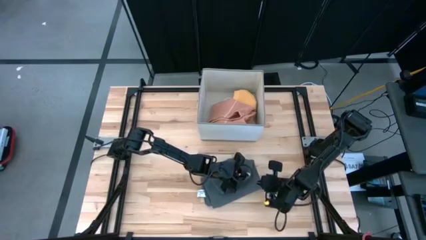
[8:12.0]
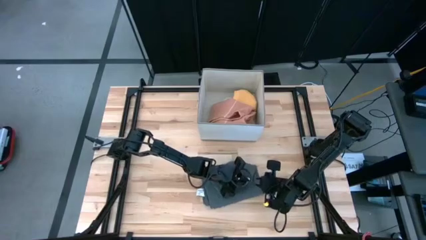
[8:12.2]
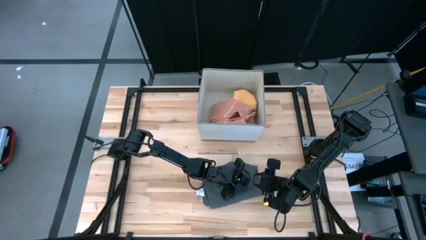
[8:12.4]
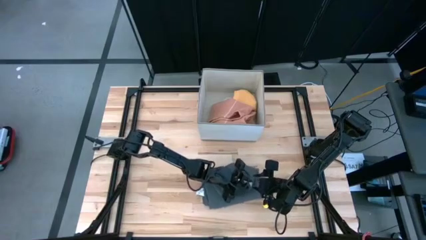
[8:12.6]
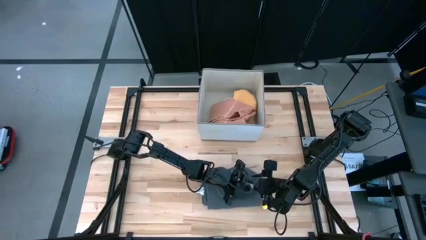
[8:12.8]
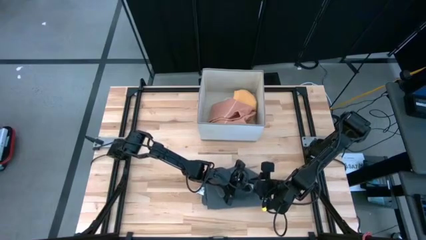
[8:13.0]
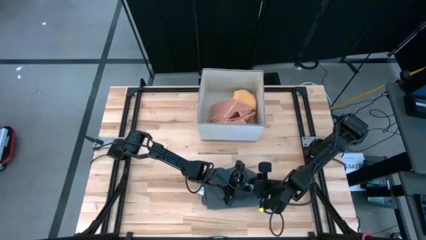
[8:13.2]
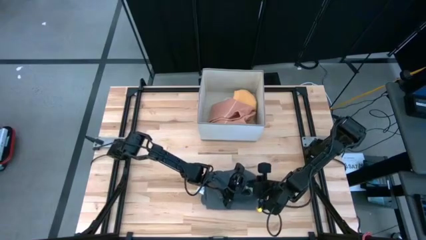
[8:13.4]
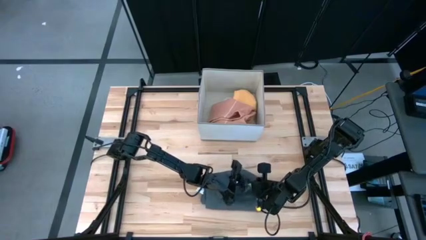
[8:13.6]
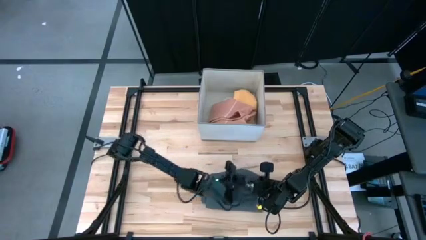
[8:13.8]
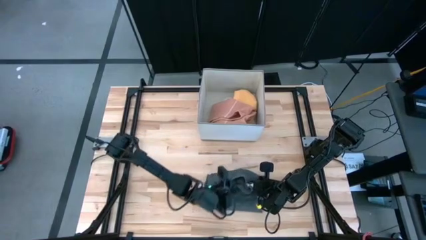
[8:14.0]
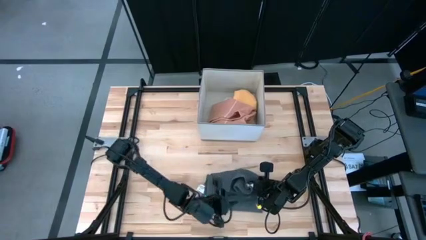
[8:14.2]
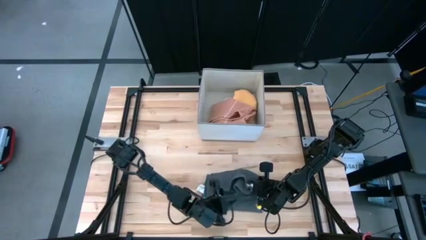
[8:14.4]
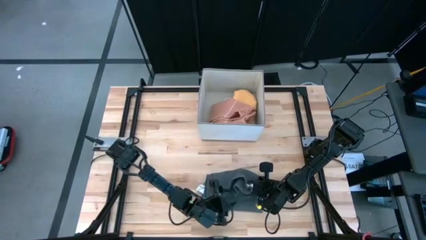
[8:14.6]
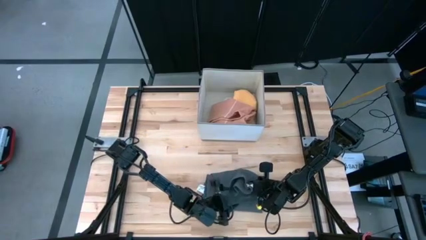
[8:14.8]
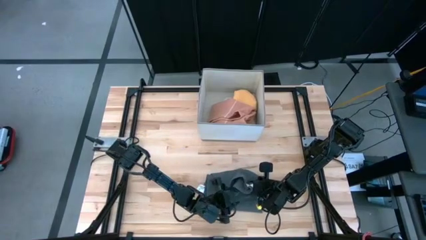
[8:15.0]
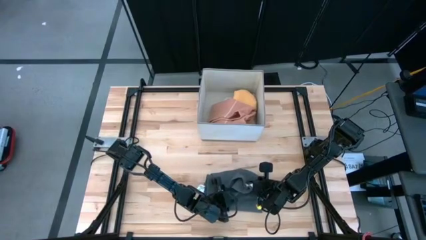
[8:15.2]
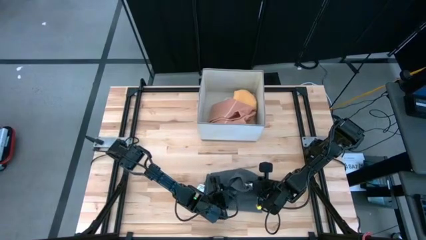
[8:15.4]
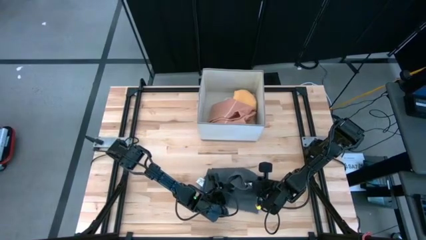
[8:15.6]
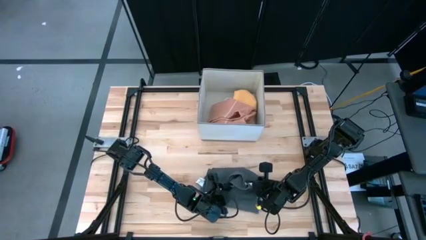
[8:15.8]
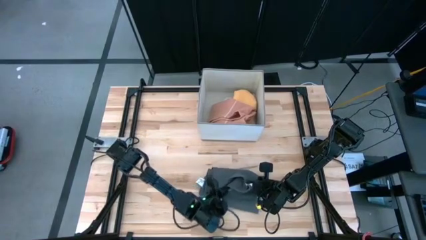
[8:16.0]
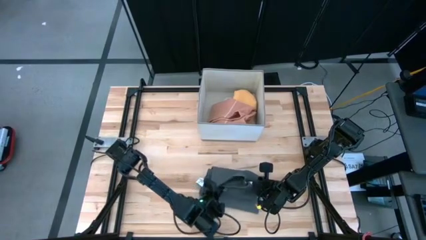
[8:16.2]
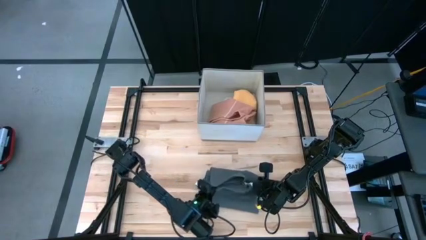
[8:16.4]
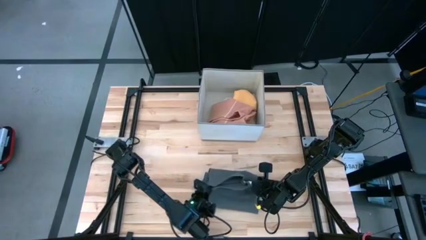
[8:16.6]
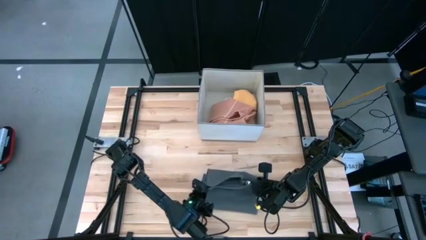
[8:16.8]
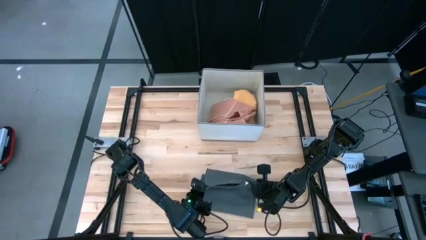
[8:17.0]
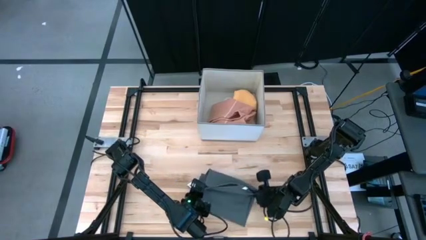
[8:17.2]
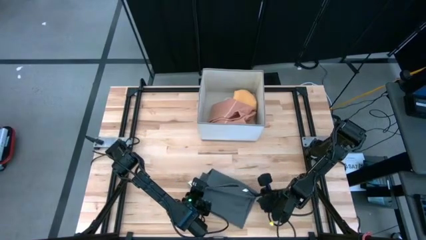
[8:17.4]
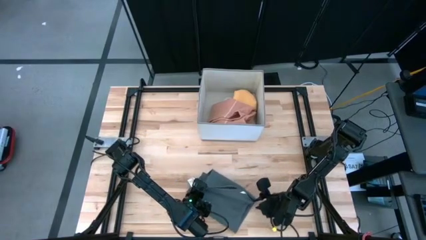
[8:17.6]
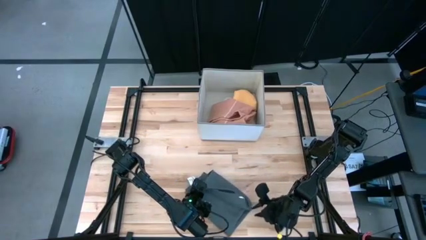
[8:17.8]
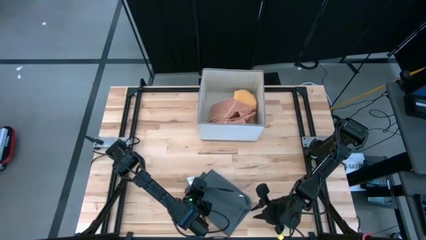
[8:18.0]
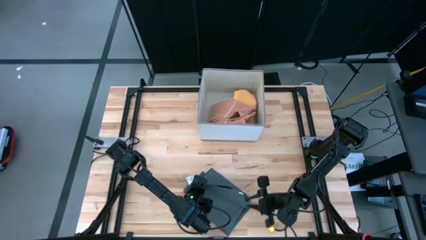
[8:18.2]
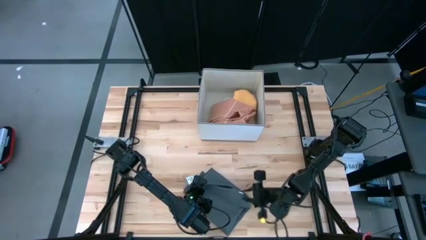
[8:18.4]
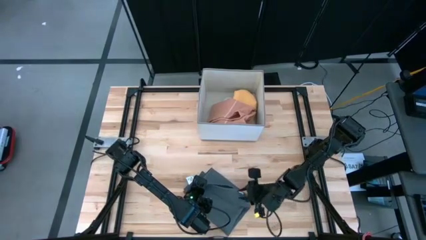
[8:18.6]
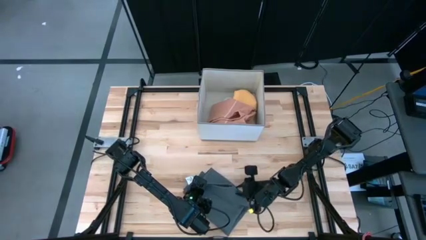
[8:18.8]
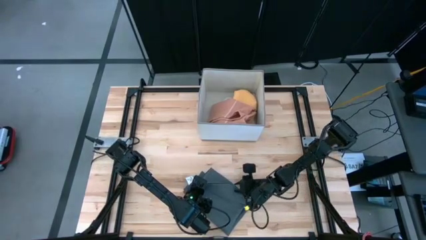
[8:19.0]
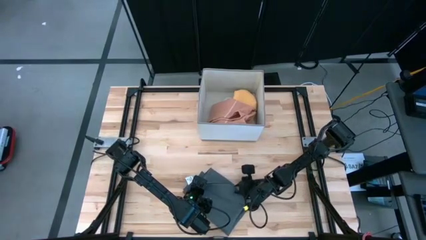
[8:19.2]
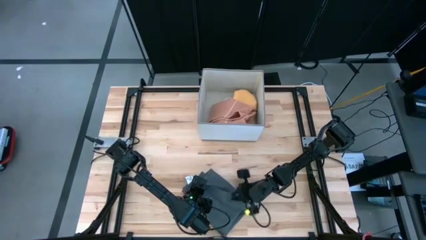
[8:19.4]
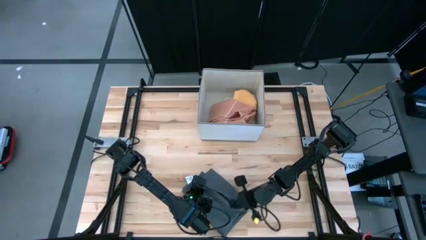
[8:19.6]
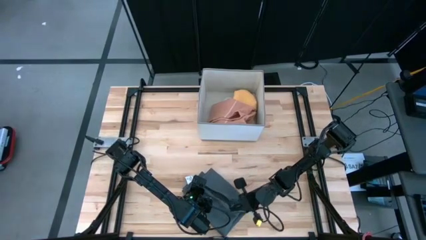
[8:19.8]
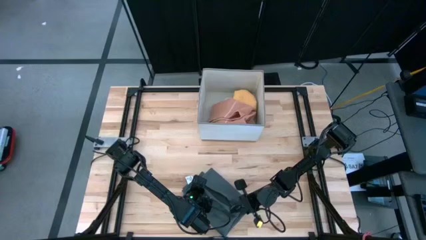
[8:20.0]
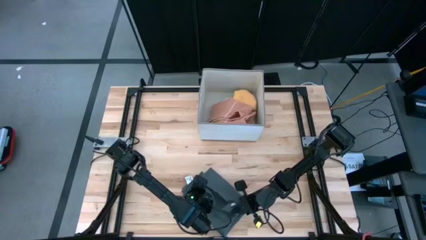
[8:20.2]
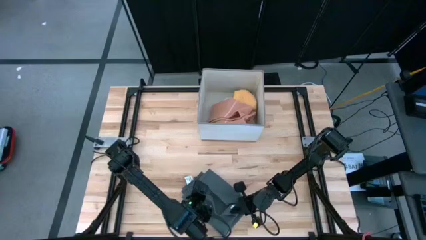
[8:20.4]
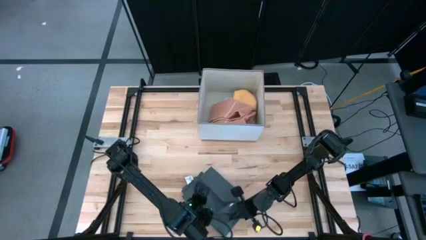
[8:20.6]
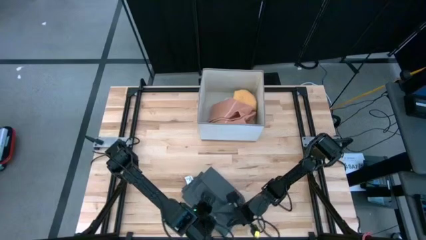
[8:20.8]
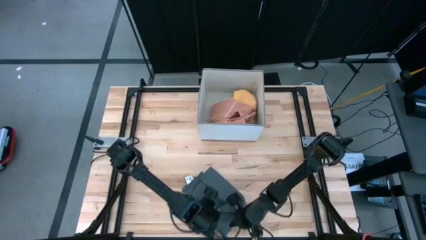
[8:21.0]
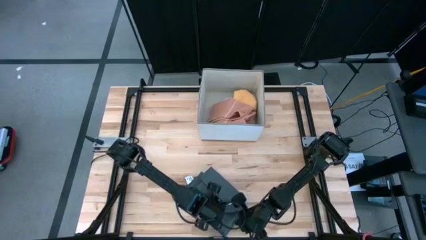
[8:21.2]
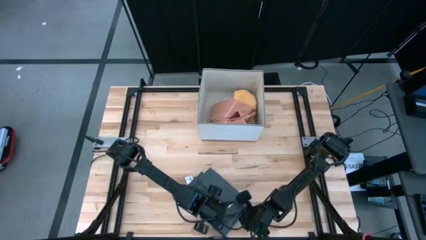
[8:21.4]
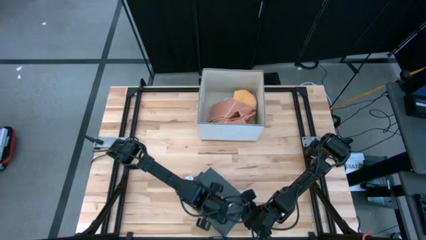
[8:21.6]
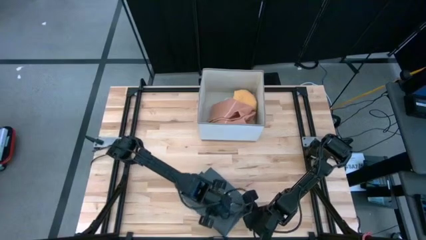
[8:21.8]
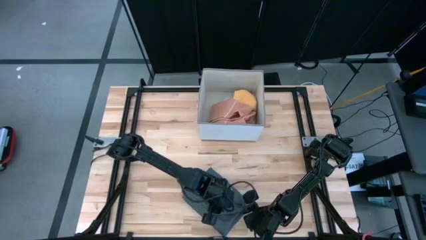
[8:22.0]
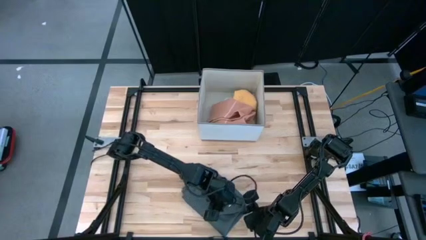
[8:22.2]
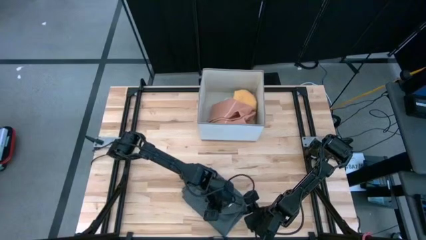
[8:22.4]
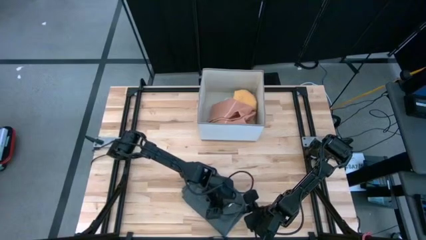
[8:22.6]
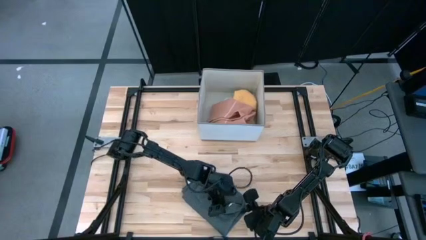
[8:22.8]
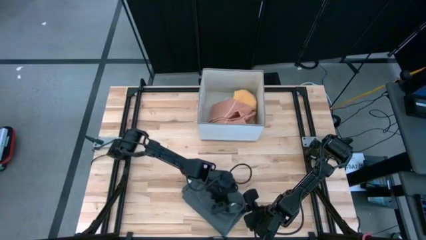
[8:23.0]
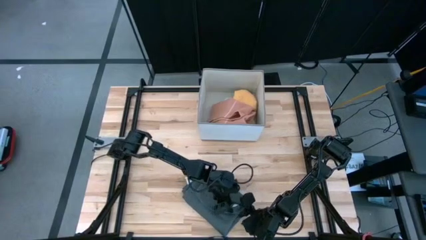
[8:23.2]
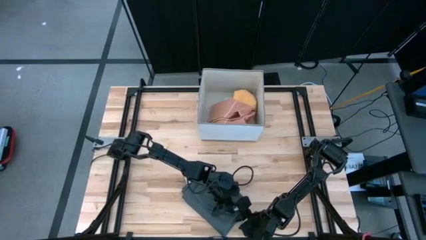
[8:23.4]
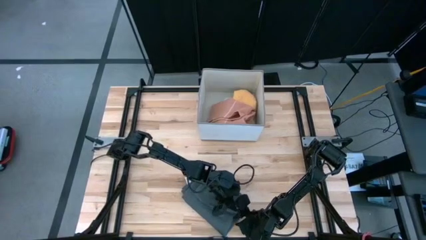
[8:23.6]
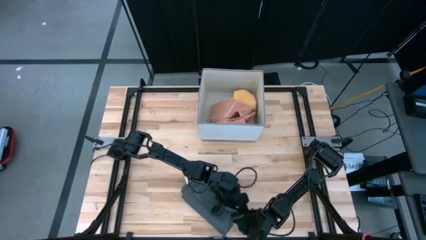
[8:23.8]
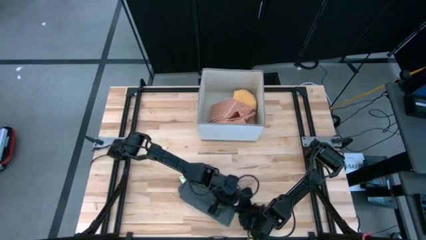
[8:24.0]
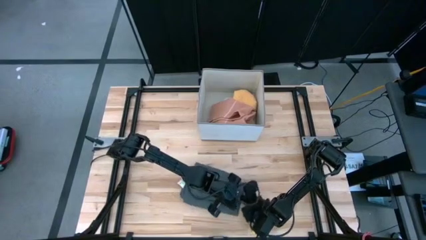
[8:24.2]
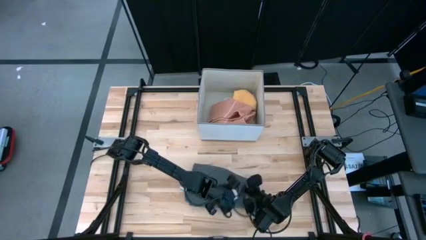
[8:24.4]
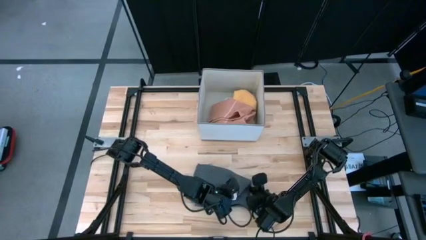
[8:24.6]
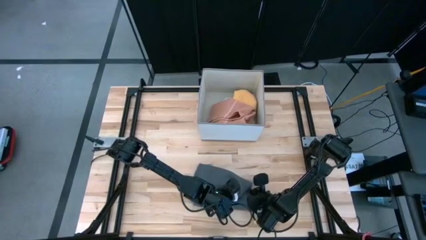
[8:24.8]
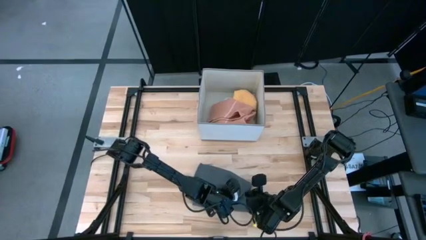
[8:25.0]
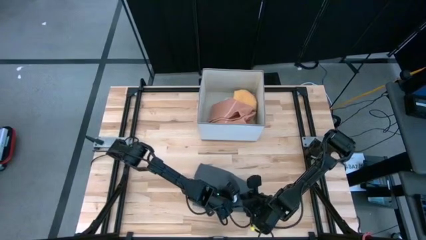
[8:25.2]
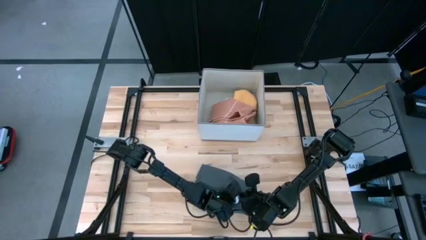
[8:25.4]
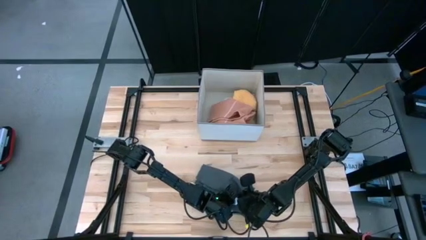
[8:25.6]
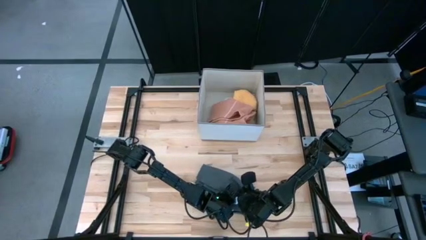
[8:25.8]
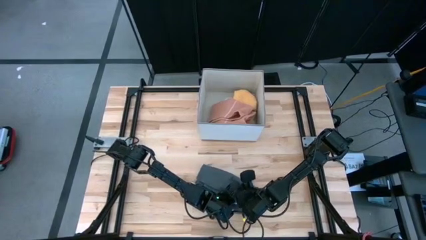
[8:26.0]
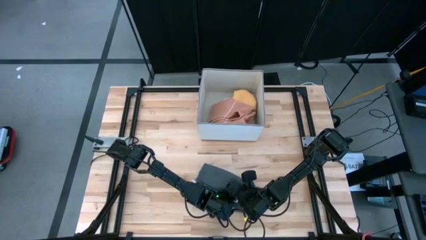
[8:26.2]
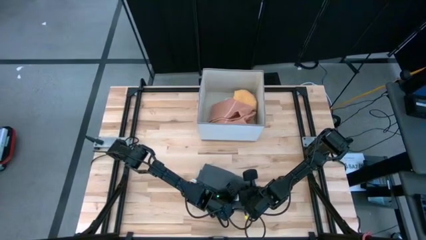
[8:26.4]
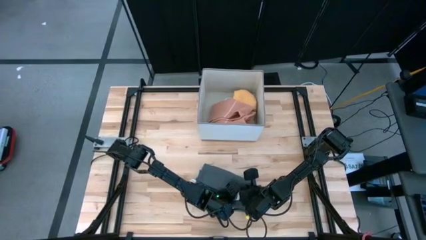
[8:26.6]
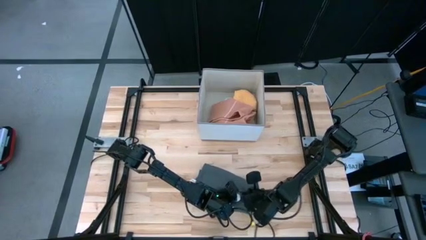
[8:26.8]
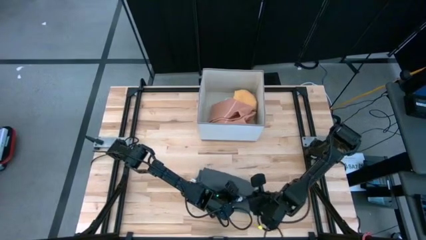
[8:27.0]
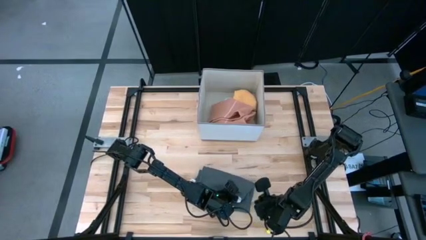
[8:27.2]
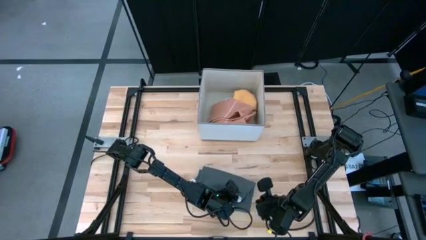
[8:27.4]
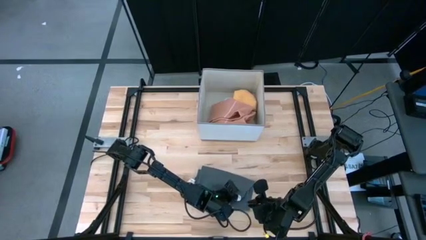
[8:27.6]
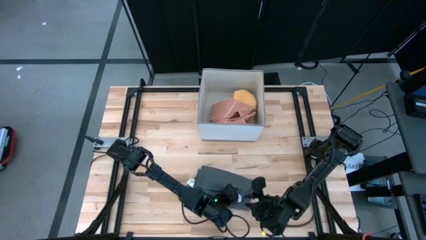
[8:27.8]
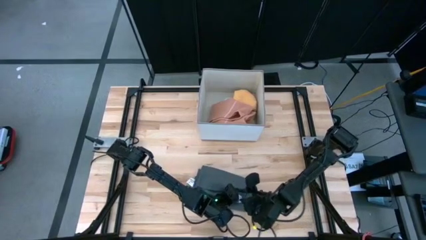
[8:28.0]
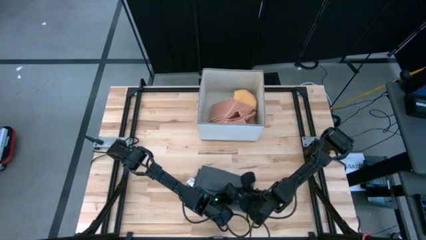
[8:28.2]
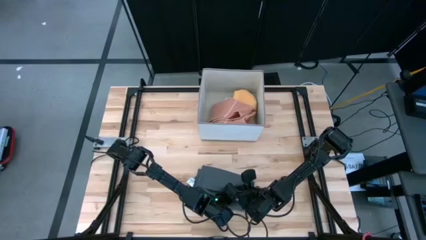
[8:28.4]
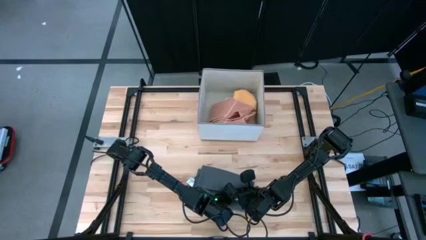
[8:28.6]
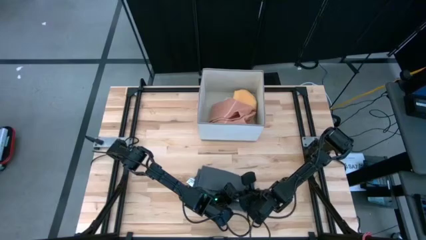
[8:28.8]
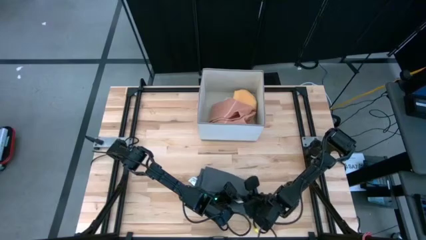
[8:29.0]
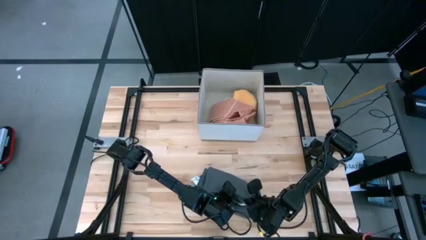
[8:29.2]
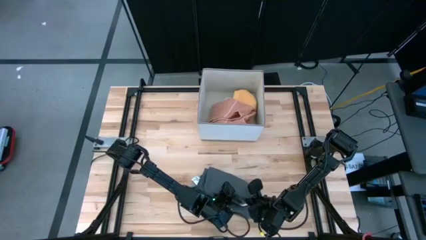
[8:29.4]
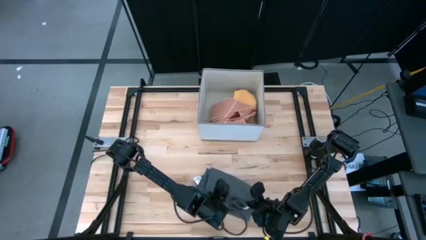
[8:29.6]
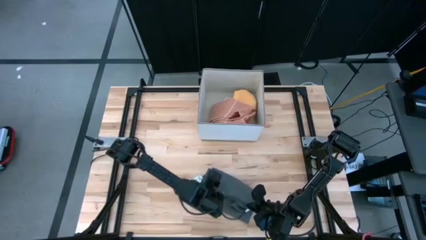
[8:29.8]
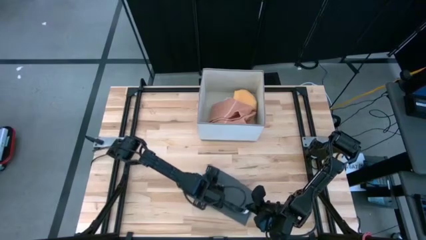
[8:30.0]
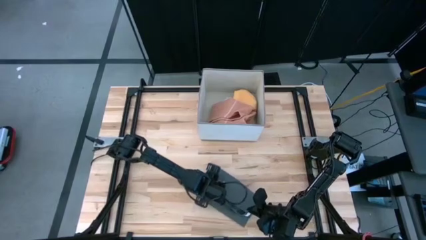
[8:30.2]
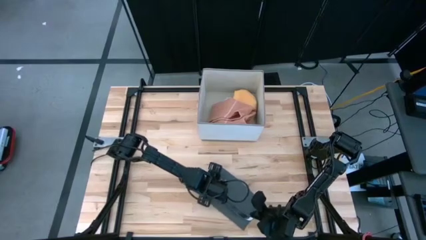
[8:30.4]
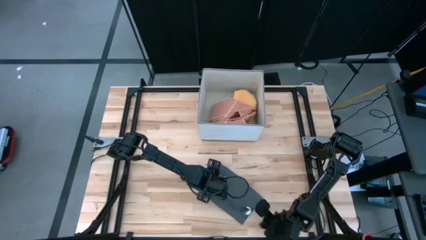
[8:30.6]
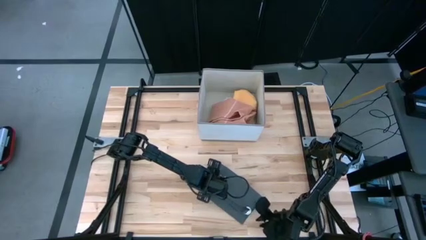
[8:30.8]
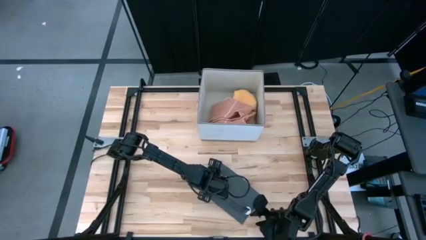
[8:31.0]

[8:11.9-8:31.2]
Task: Fold towel
Fold the dark gray towel
